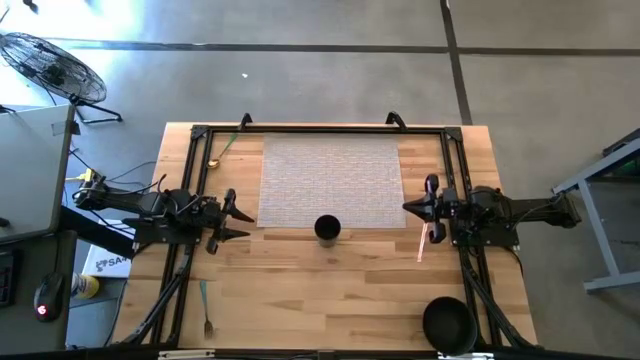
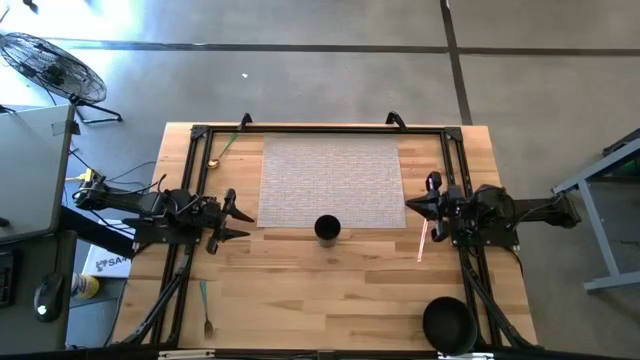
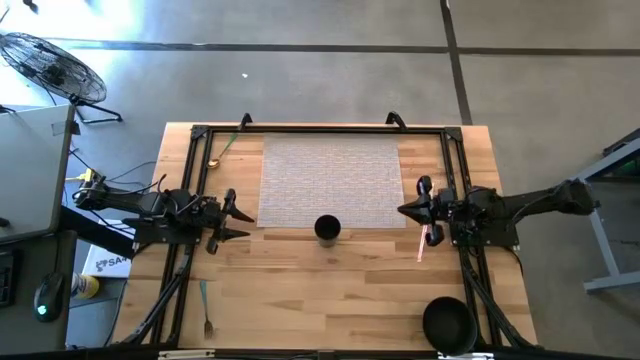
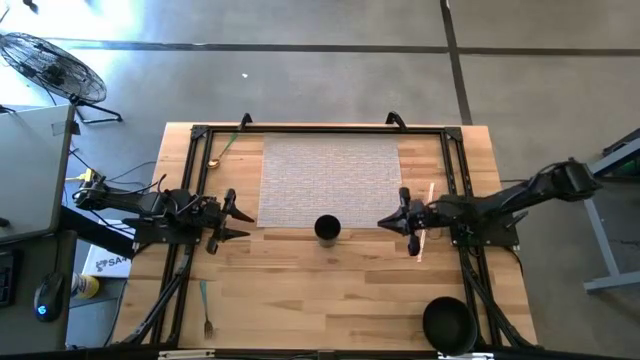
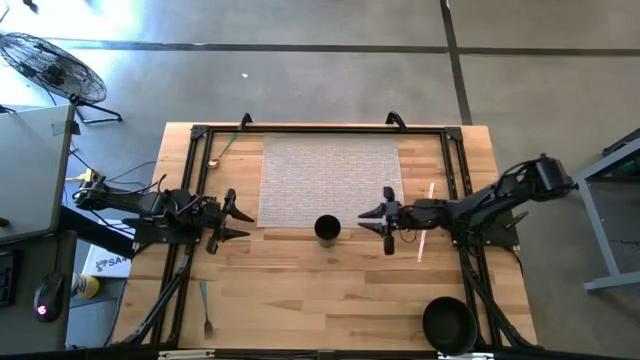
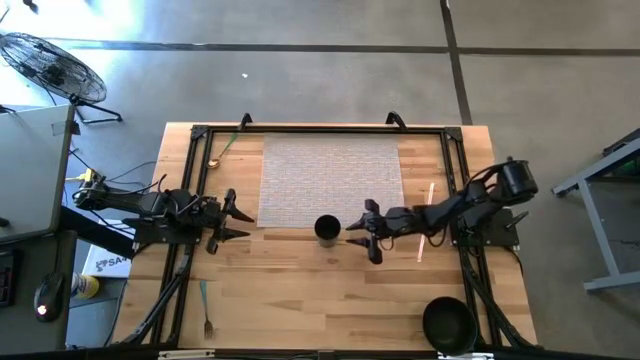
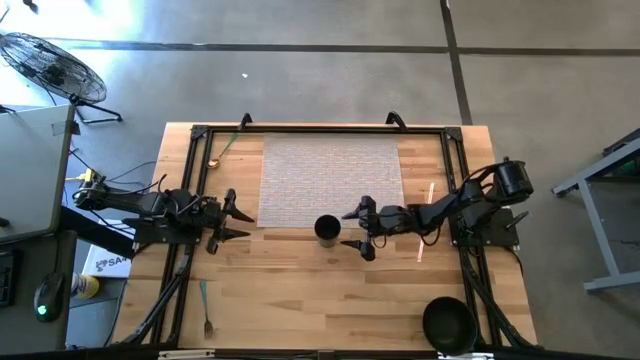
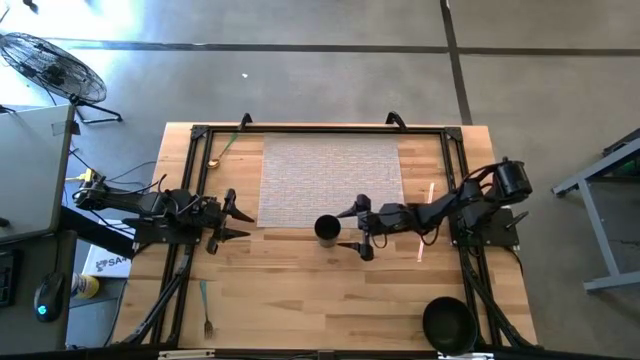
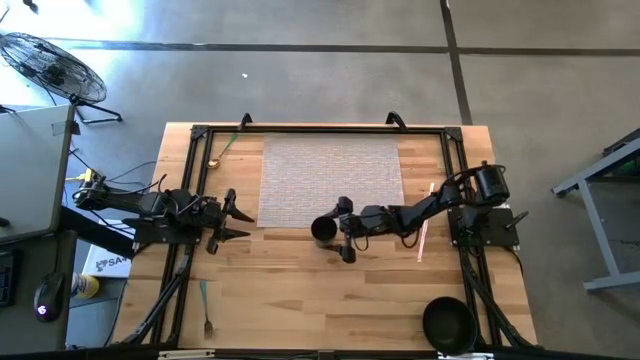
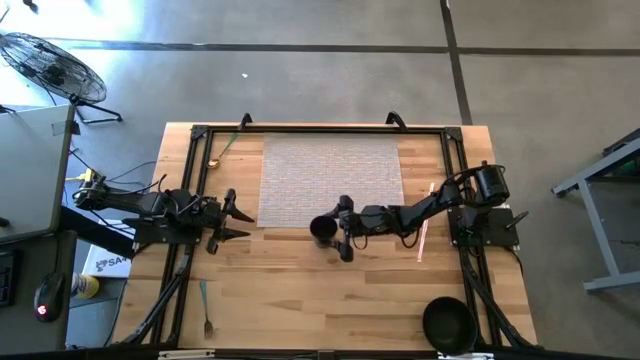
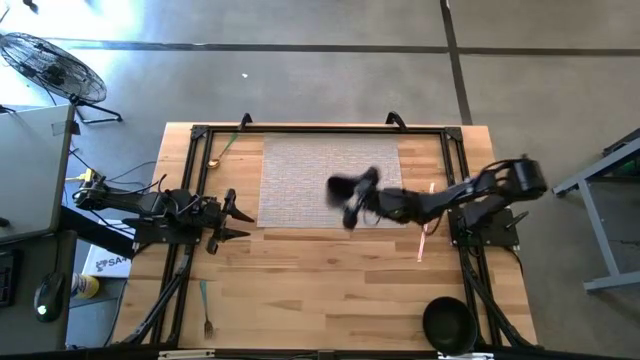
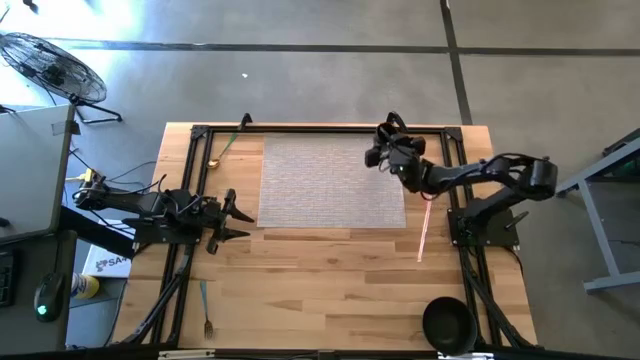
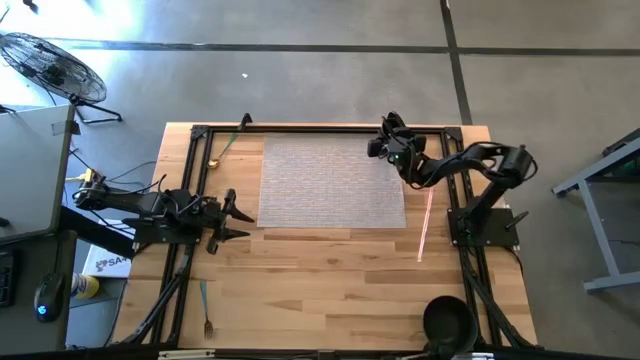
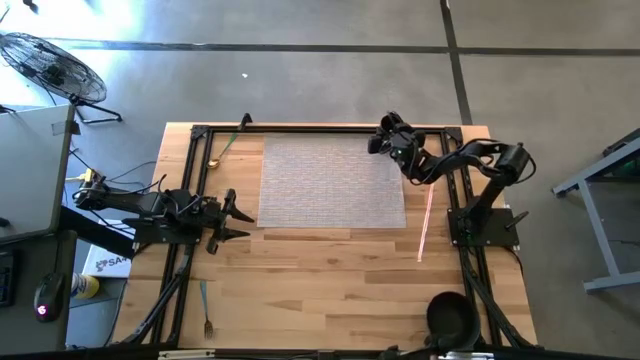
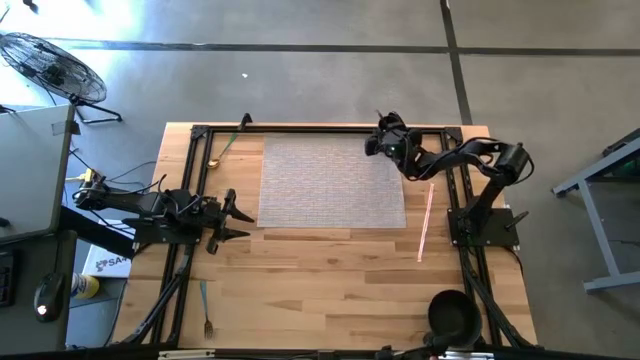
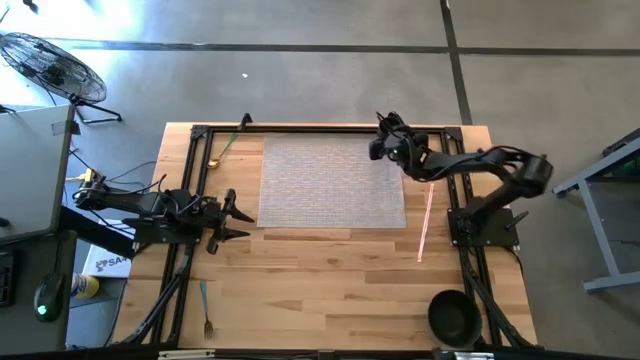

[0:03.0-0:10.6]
Task: Pick & Place Utensil
Put the black cup on the gray mat

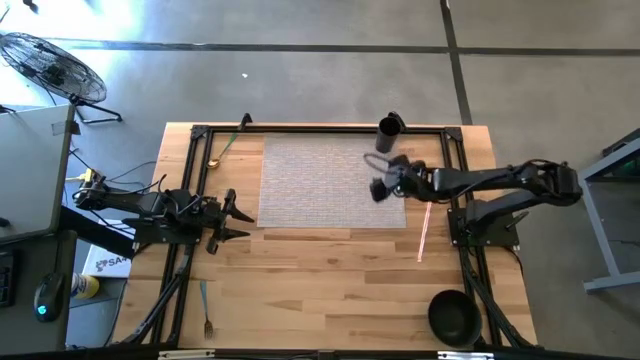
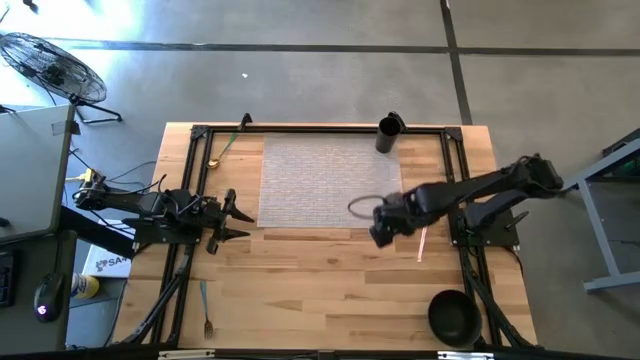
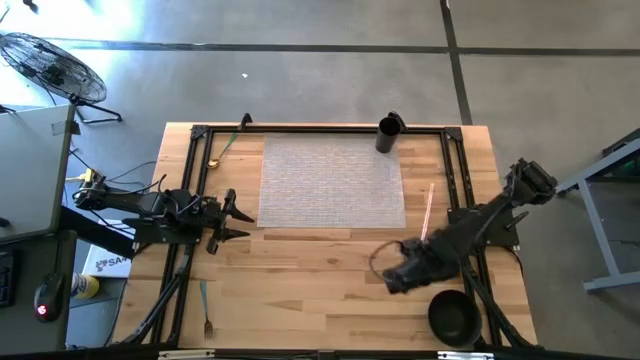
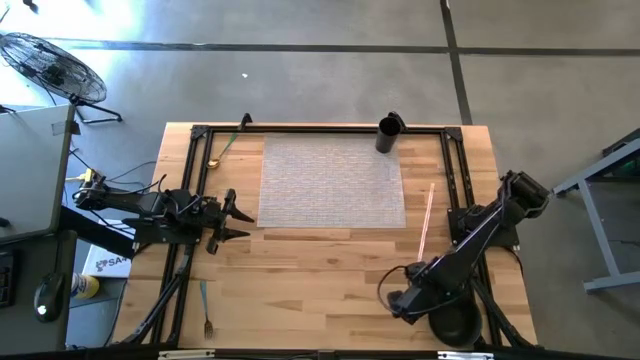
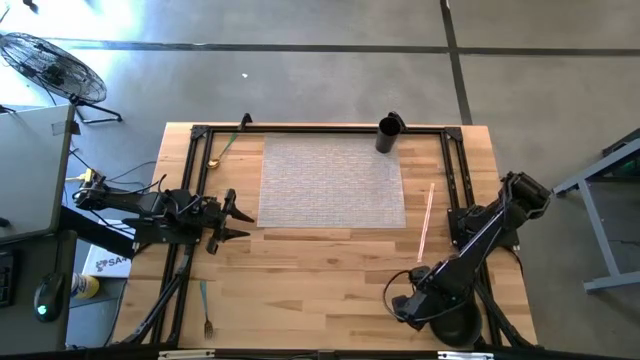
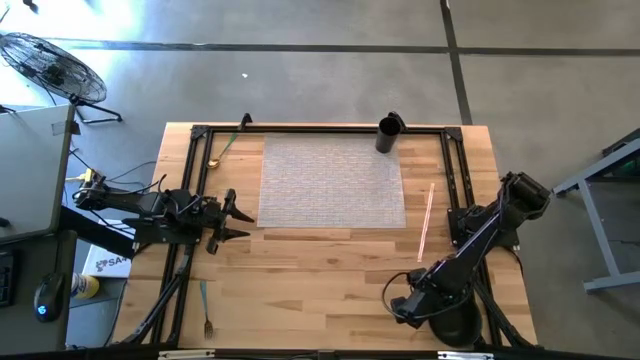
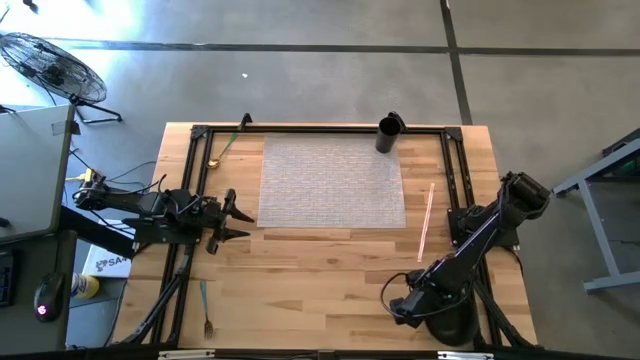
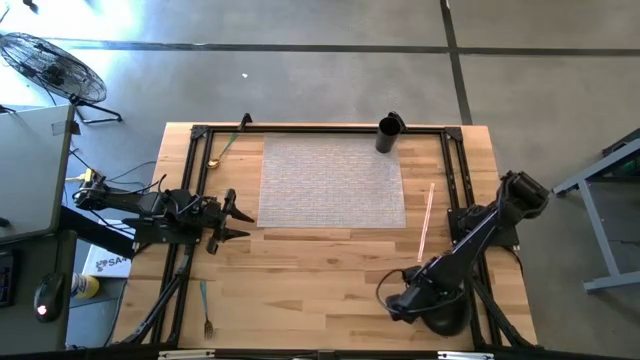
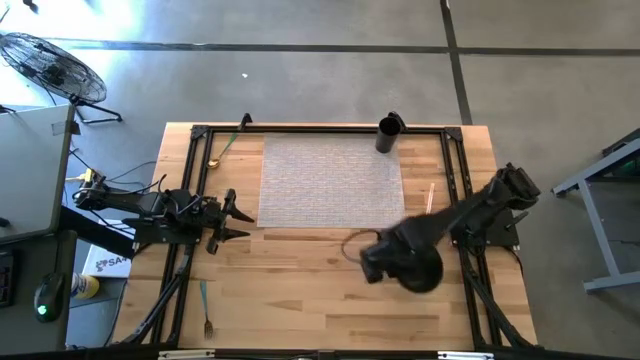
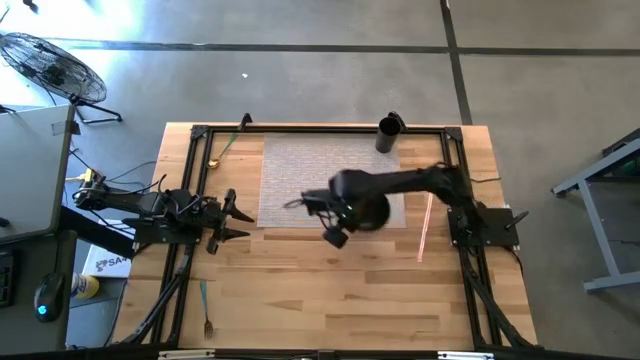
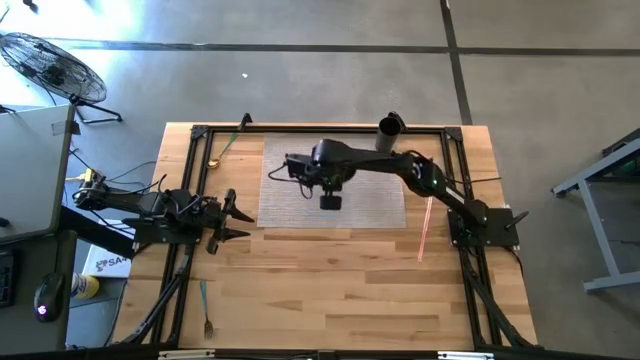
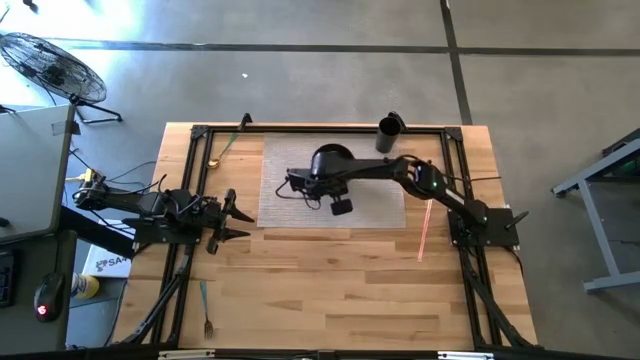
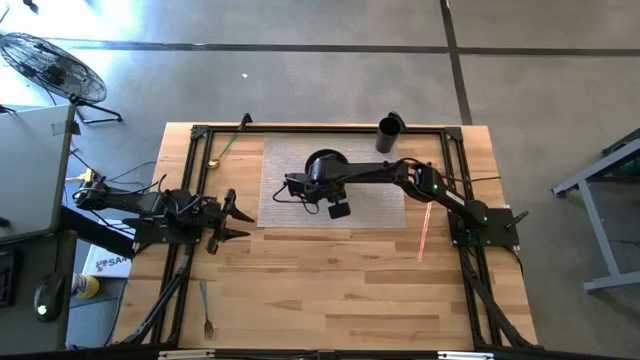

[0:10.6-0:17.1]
Put the black bowl to the bottom left of the black cup on the mat

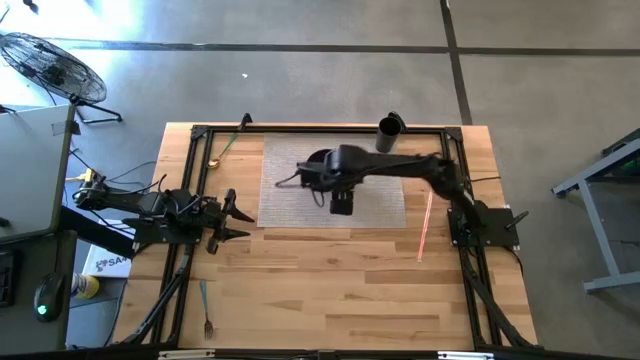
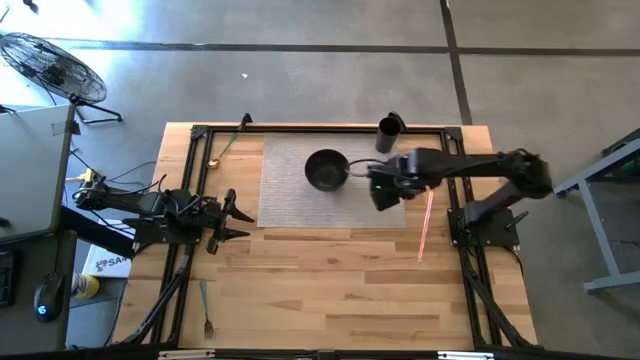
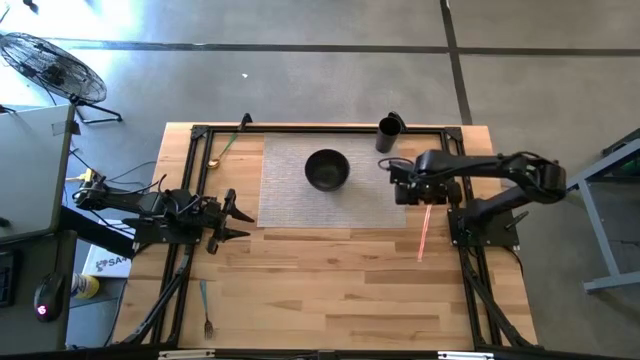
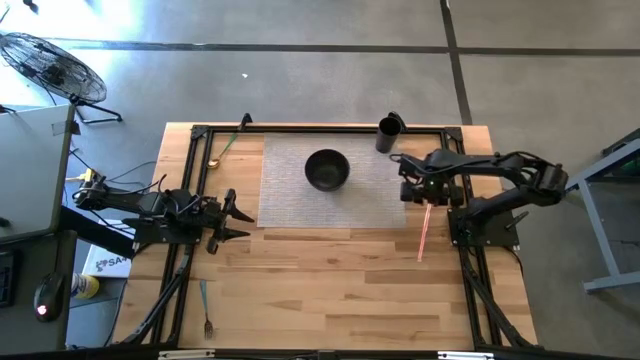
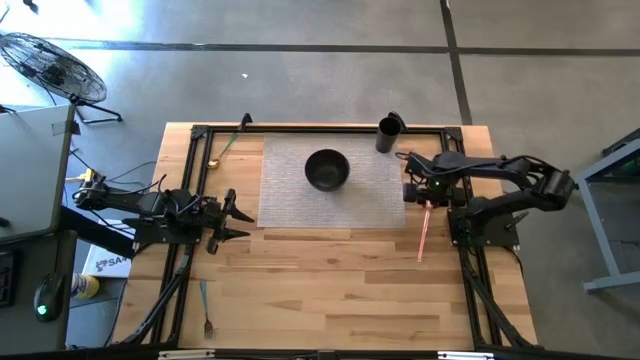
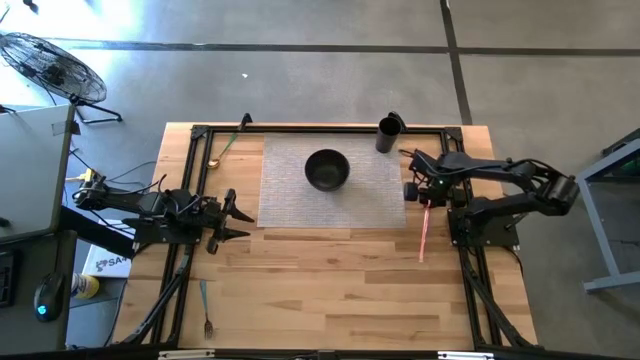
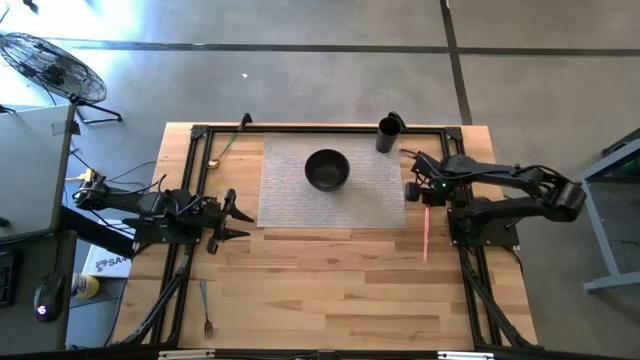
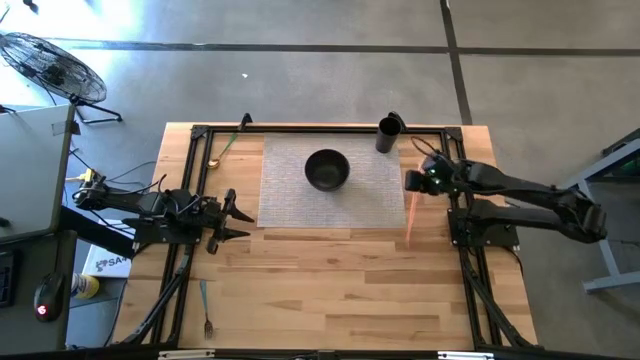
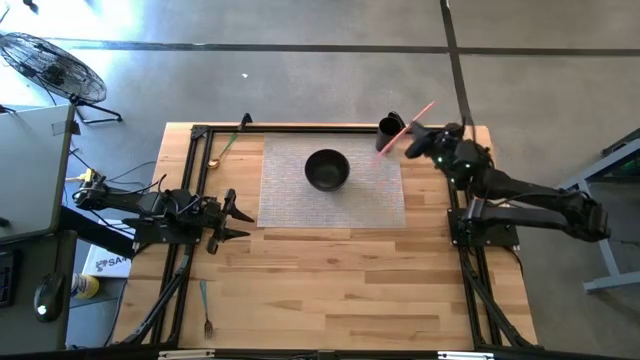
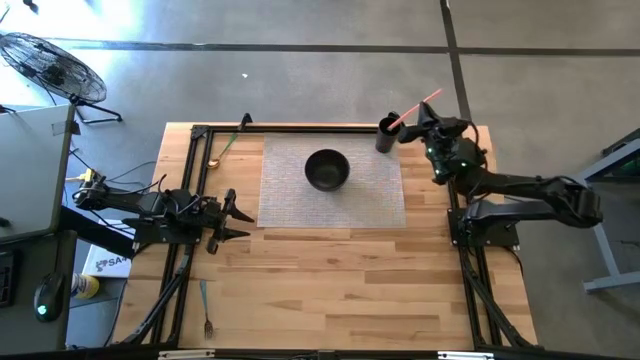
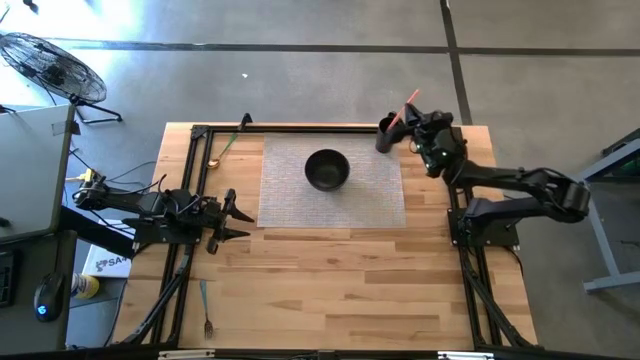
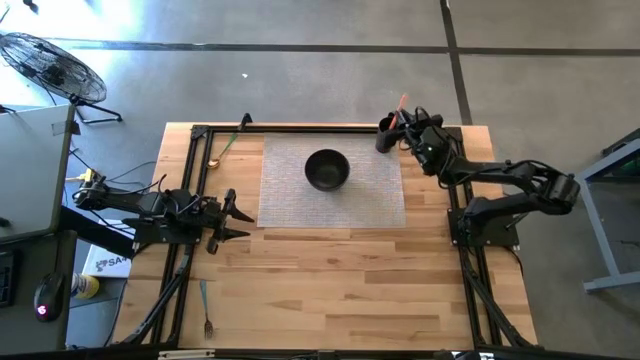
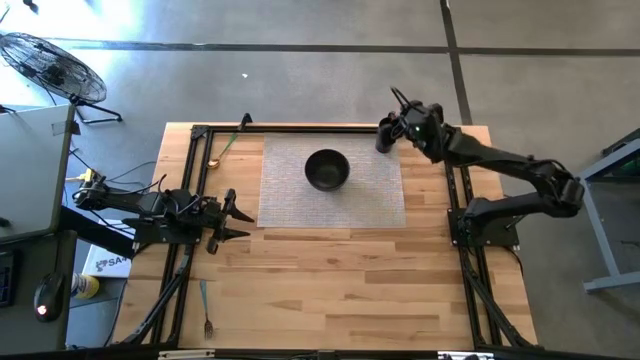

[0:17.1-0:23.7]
Put the orange straw into the black cup
